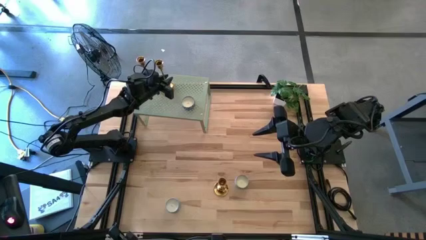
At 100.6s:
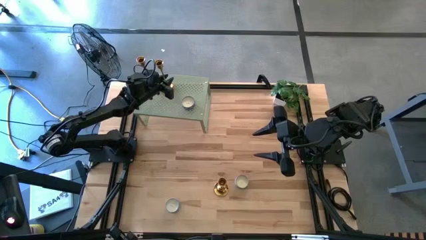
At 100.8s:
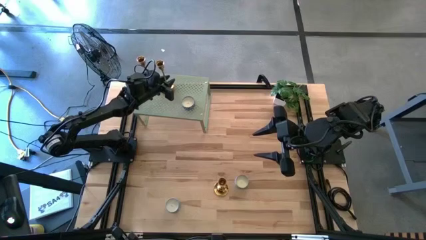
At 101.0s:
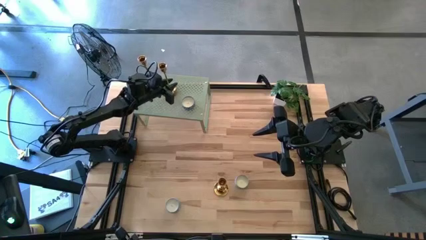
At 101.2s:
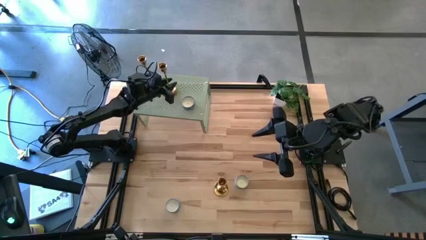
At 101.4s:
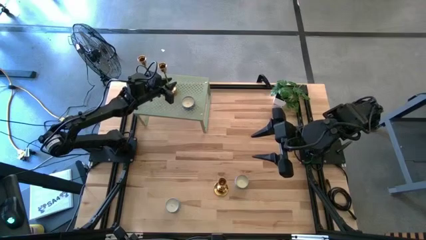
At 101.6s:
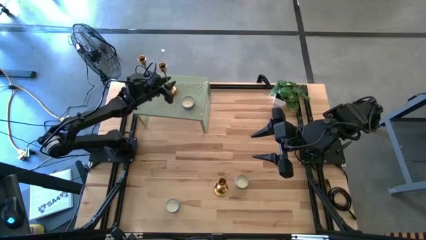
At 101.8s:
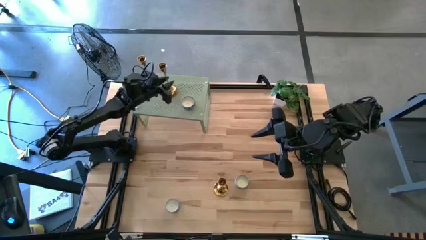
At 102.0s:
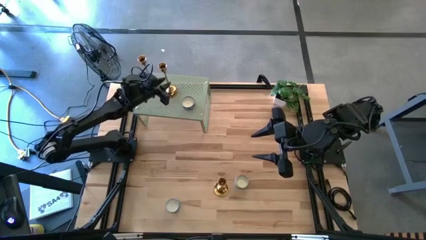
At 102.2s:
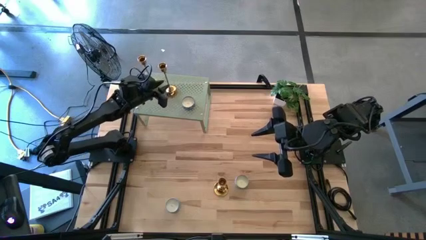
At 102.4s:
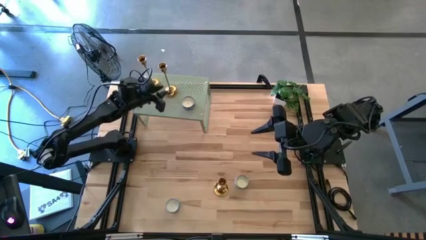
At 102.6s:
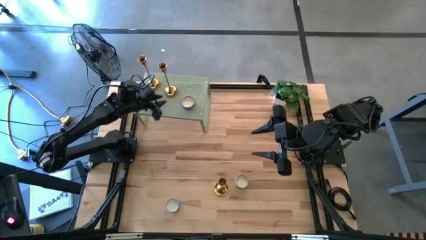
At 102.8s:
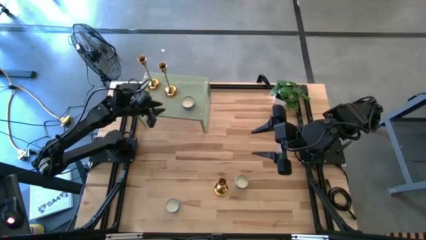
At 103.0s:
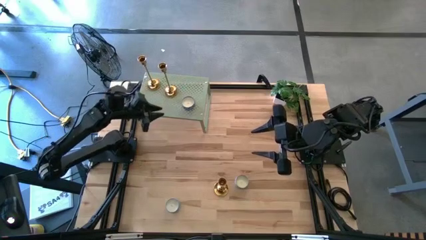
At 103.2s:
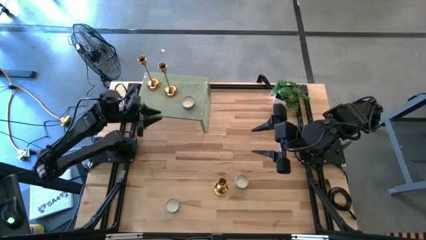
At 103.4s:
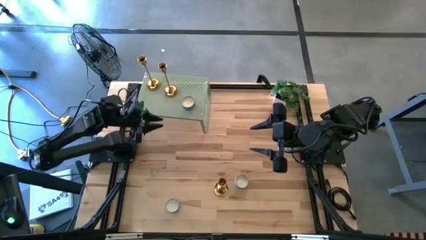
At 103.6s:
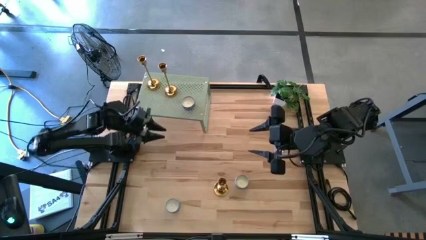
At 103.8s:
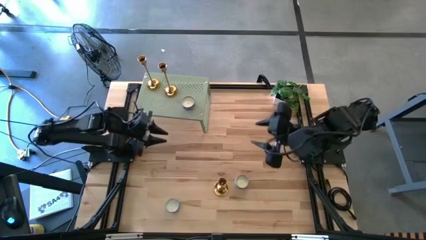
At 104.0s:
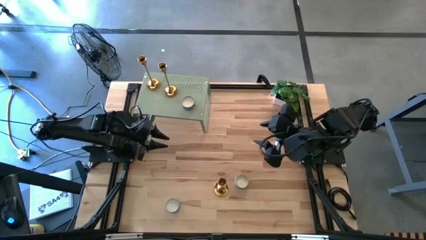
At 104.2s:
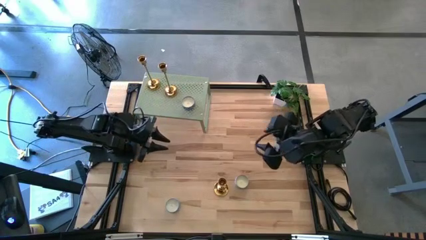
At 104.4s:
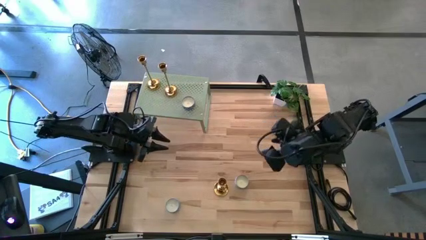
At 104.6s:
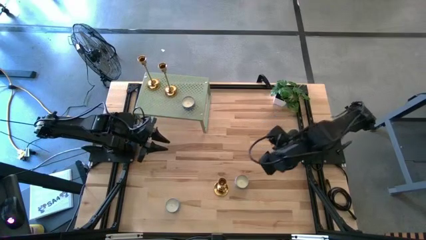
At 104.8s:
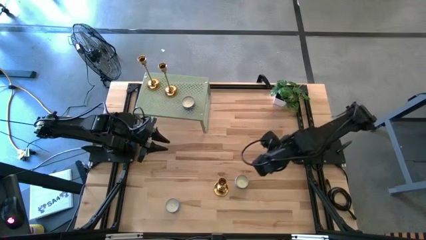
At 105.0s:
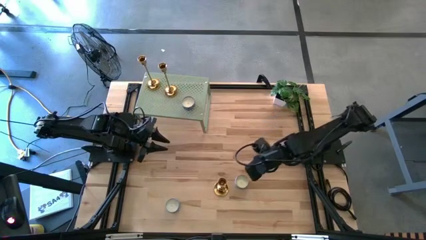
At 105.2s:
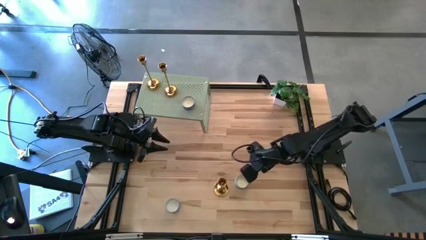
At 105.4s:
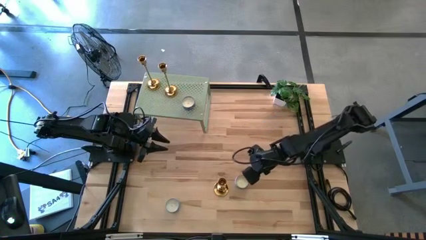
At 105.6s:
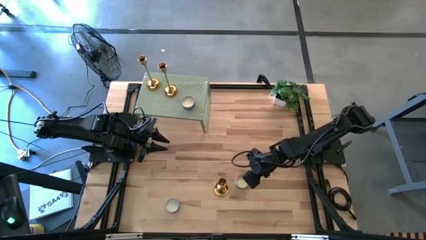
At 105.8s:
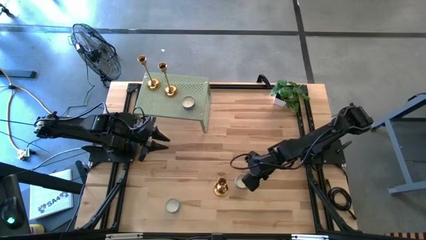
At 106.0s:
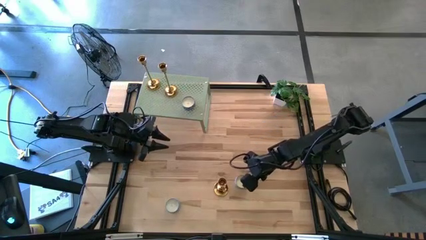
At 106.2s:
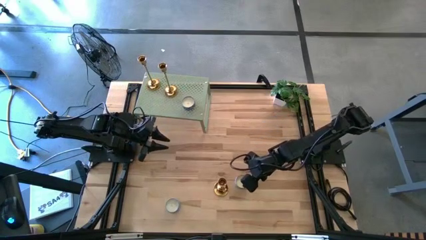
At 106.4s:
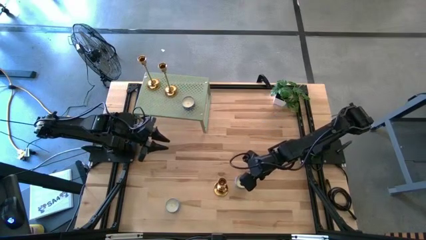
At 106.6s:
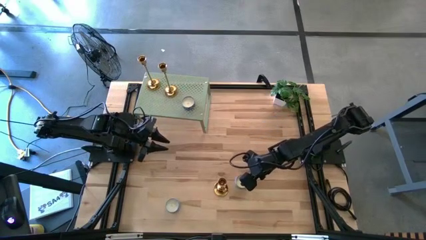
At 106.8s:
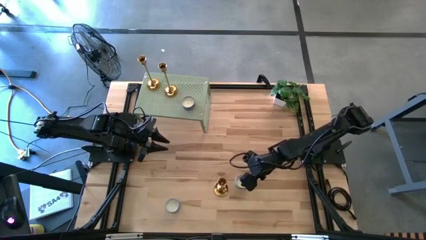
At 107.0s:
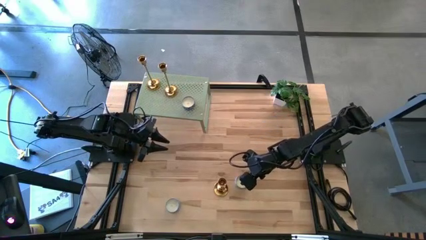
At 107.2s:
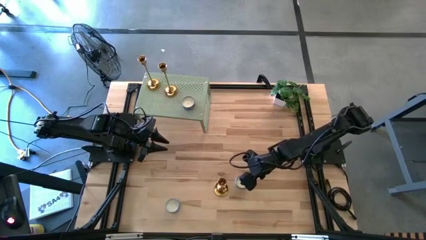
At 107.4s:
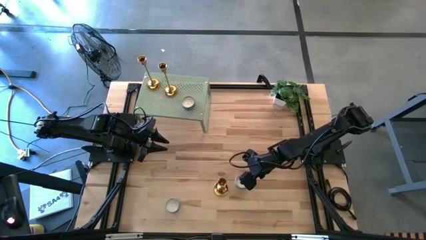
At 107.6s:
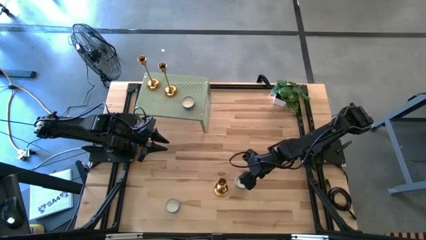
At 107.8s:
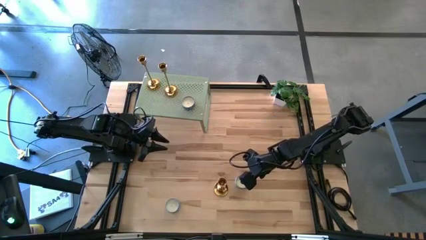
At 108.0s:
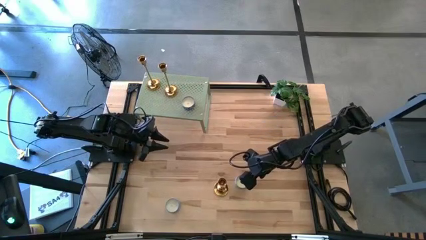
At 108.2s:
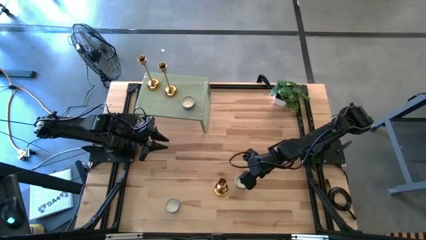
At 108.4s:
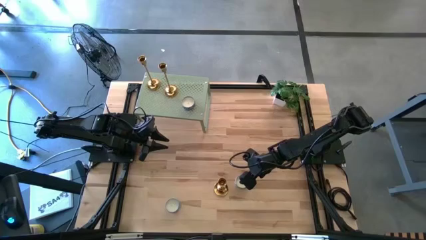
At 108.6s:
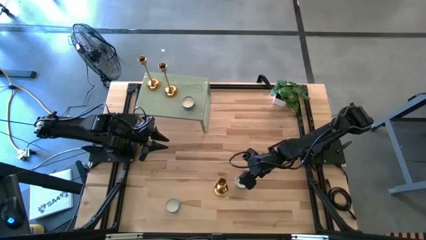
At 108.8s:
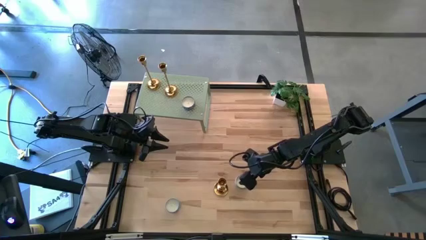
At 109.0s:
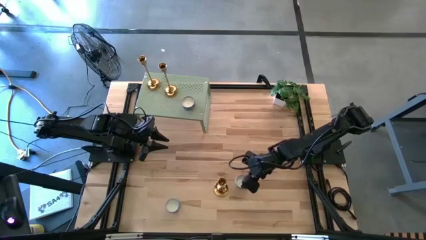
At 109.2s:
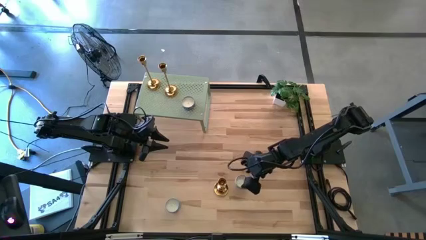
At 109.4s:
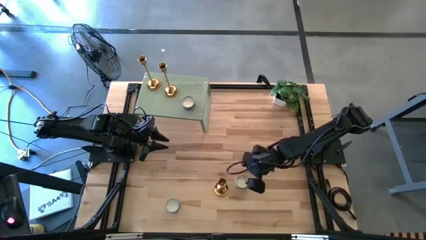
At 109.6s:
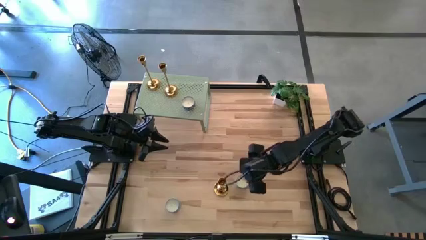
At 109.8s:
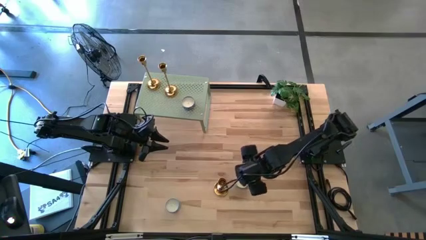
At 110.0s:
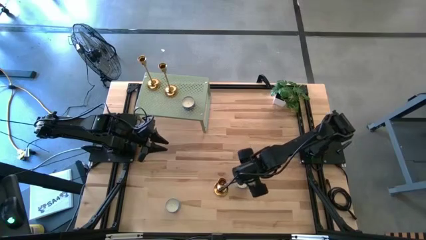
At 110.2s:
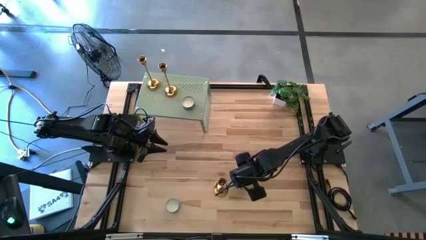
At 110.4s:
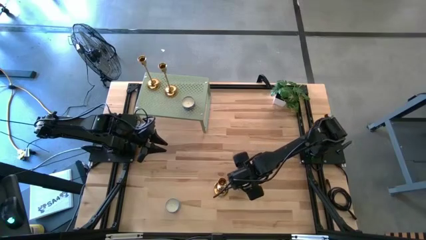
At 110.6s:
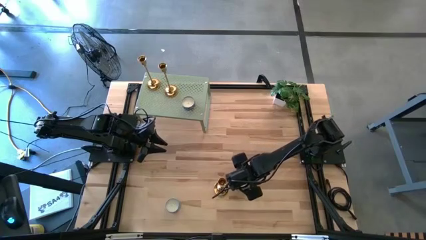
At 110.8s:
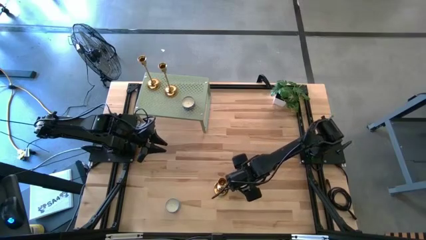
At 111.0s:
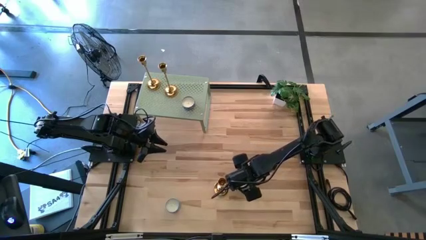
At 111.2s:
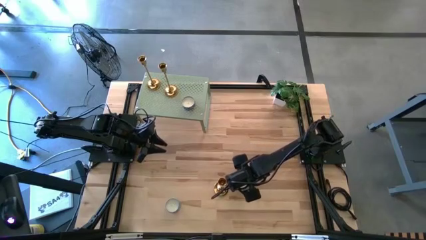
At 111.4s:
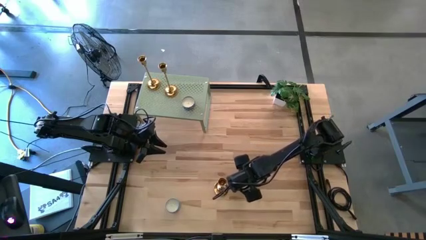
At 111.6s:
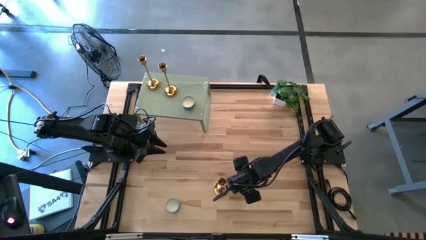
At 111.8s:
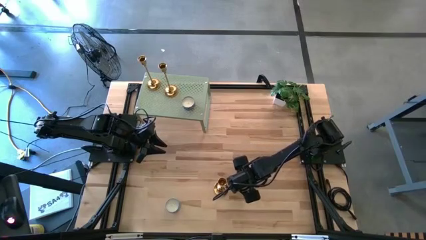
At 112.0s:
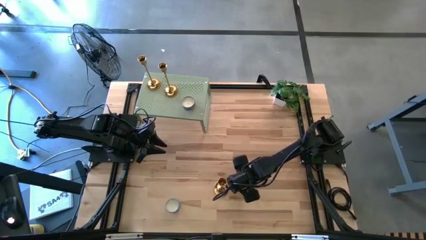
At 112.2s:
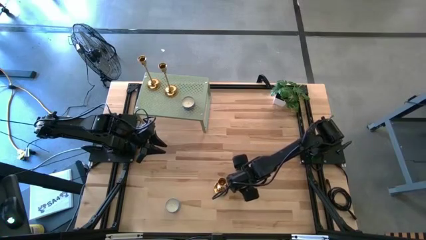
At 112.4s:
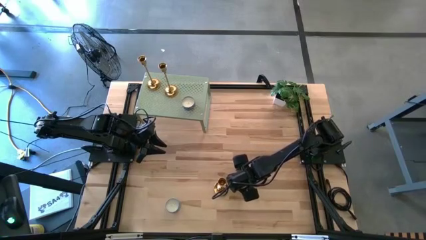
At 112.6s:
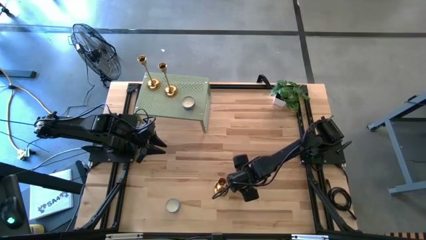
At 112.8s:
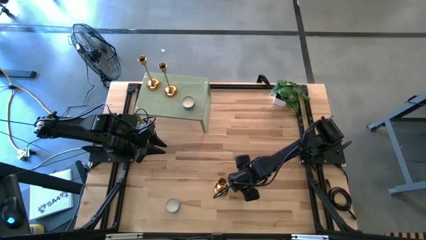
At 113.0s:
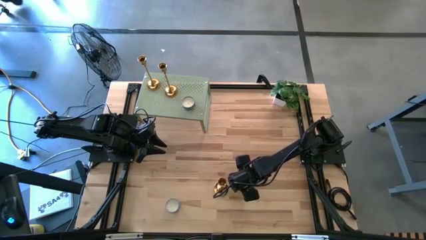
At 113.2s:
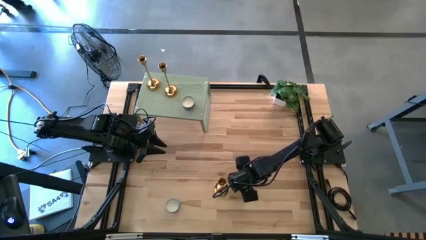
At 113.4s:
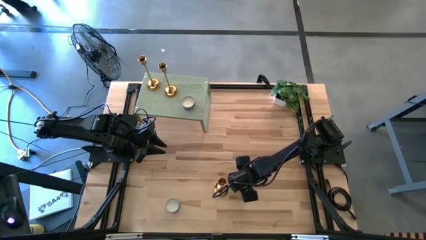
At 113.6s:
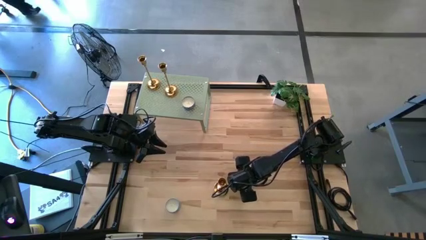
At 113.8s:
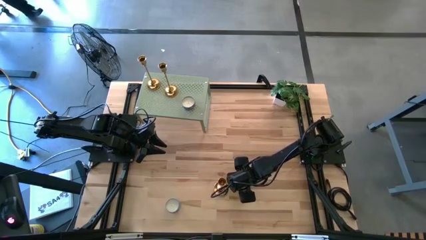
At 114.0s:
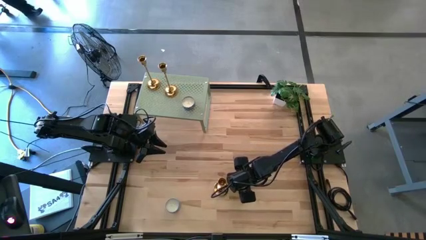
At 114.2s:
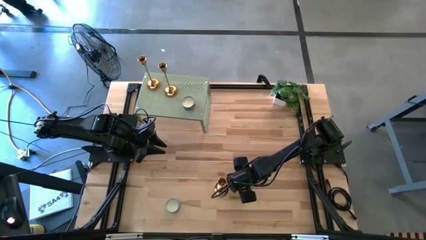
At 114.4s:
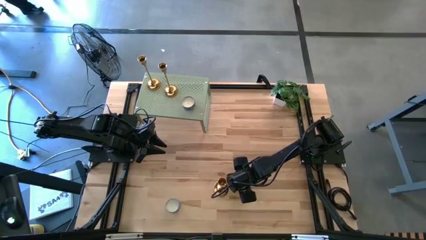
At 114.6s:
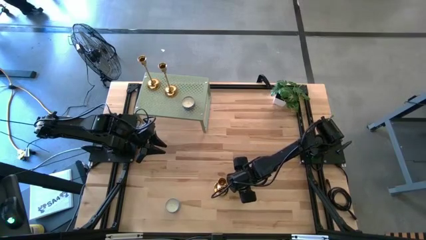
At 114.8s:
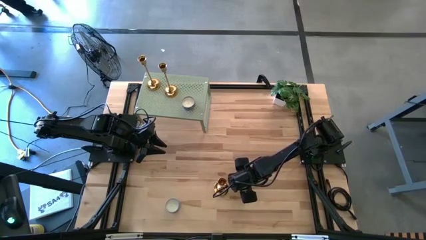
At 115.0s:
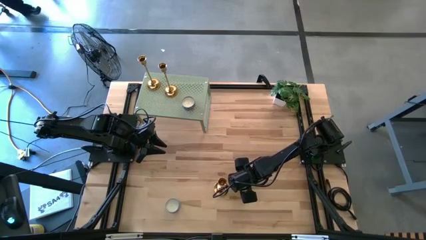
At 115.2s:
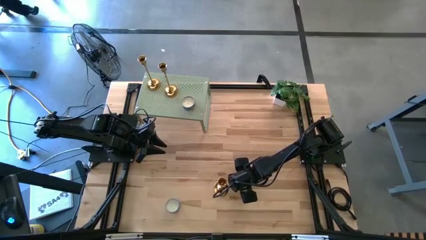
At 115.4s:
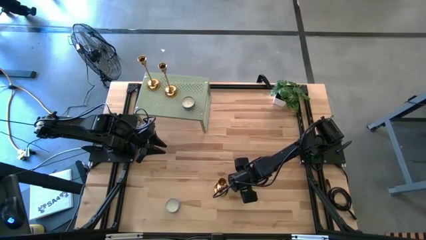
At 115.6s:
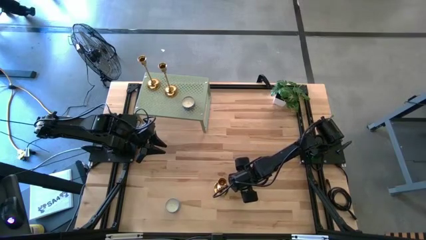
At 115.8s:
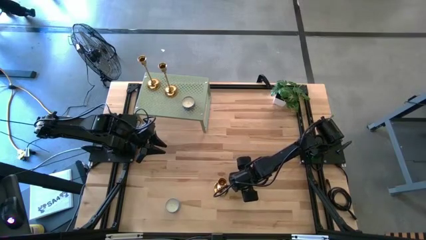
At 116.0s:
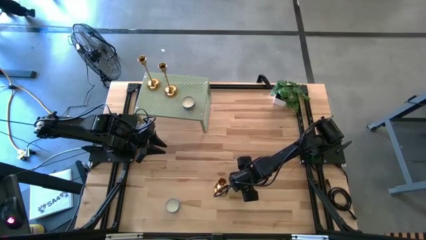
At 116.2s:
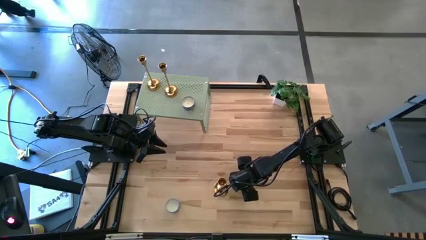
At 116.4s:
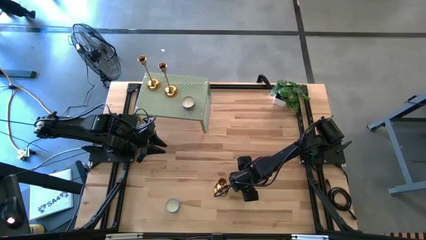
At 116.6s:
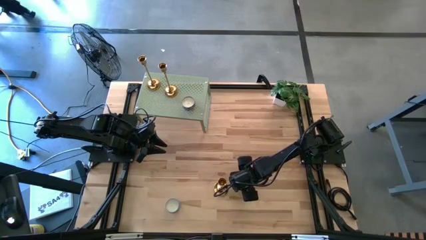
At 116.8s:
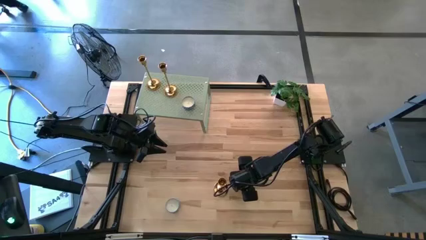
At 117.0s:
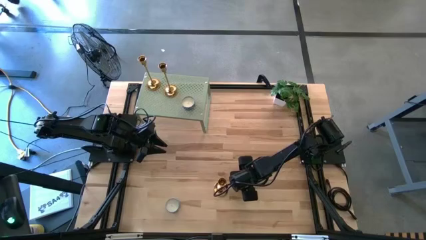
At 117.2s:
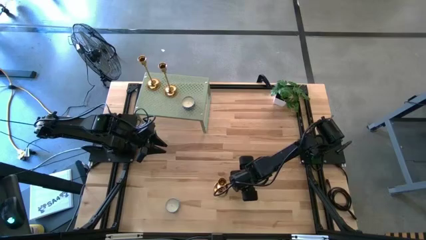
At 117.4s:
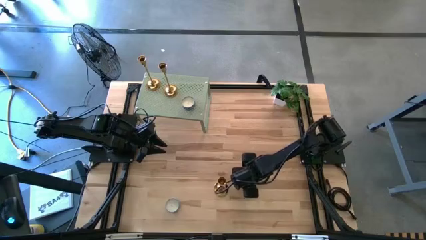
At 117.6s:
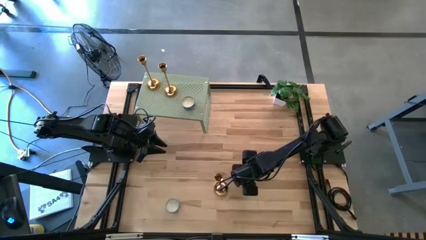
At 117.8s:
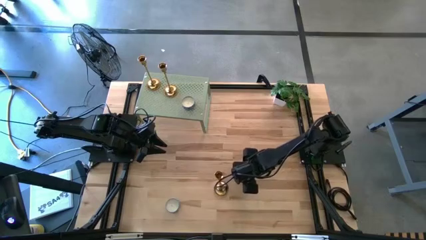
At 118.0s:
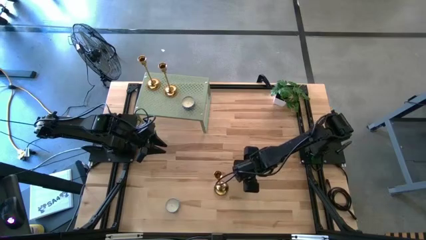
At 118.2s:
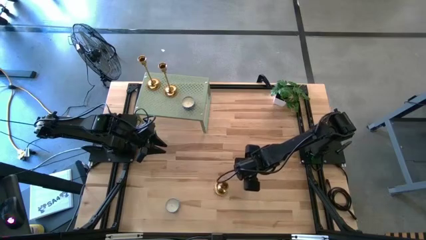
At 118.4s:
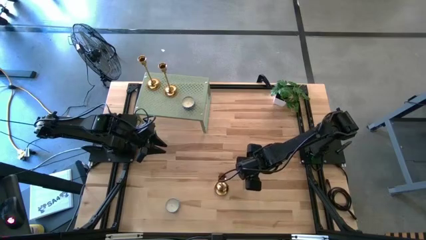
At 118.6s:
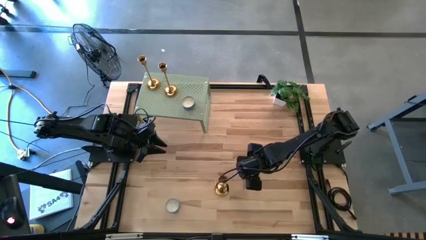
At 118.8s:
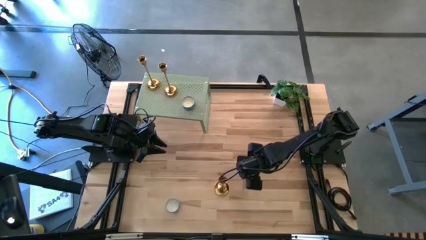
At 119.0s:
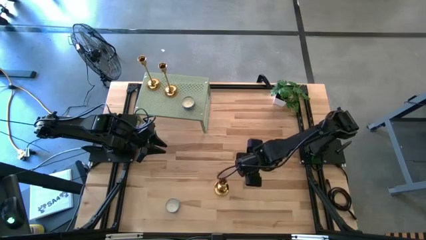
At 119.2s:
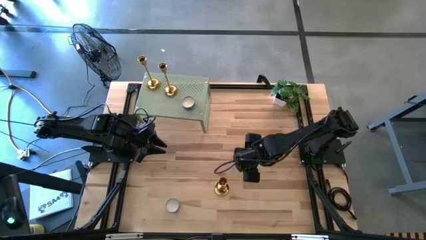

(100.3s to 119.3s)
Task: Pick & Place candle stick holders
Put the right blue patterned round candle on the shelf
